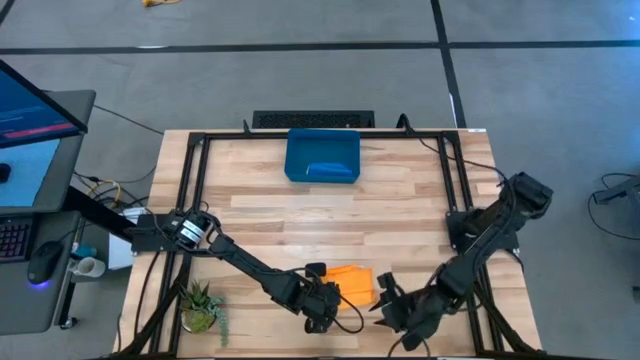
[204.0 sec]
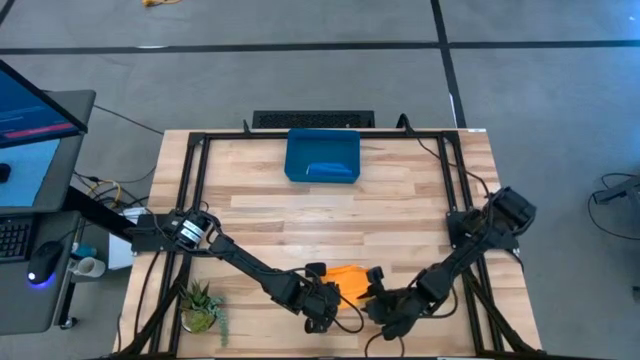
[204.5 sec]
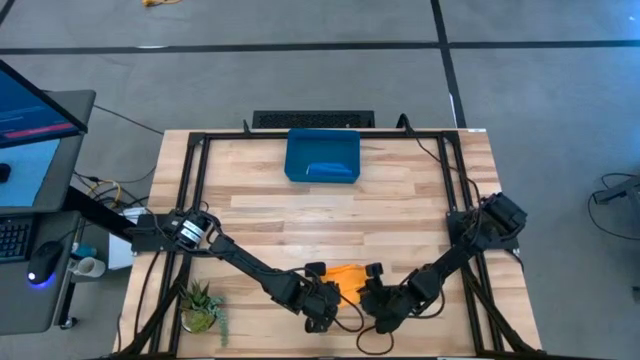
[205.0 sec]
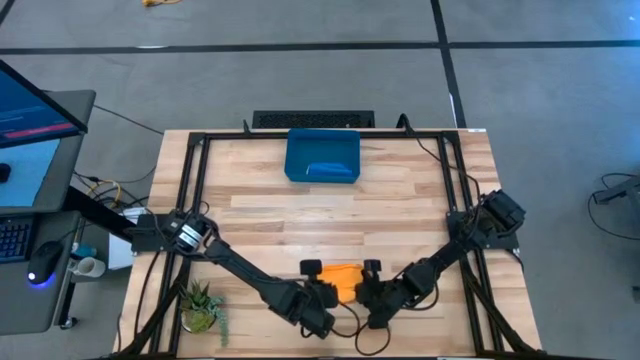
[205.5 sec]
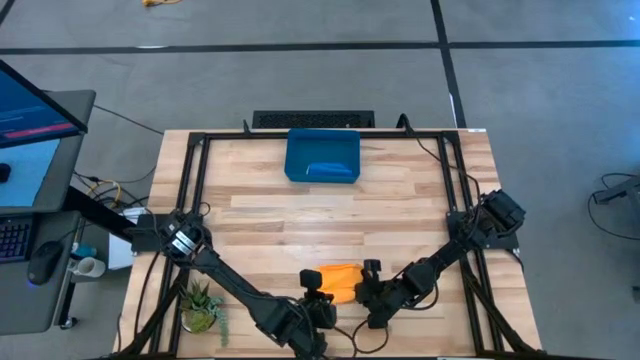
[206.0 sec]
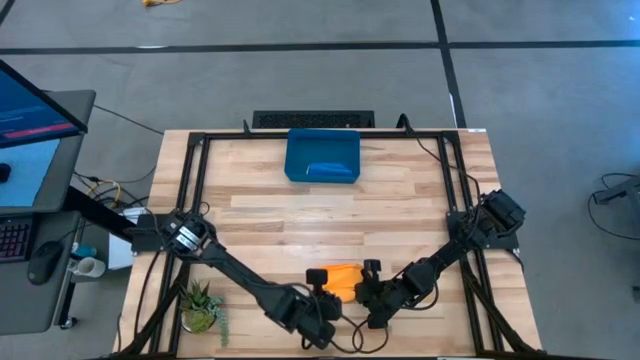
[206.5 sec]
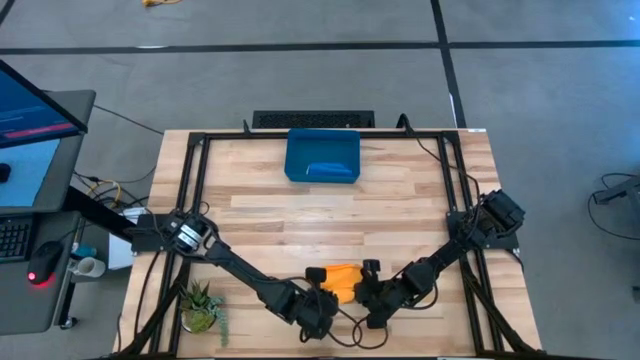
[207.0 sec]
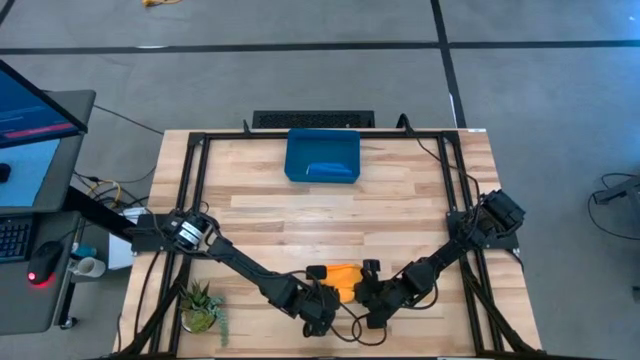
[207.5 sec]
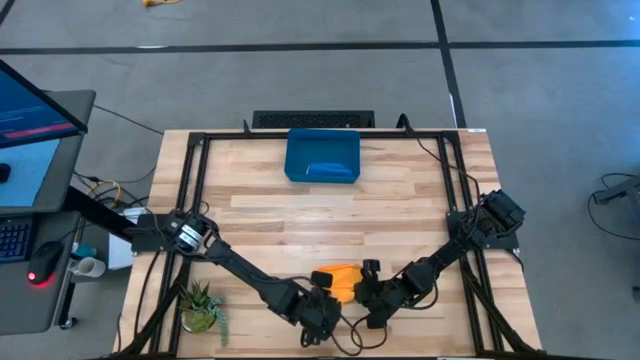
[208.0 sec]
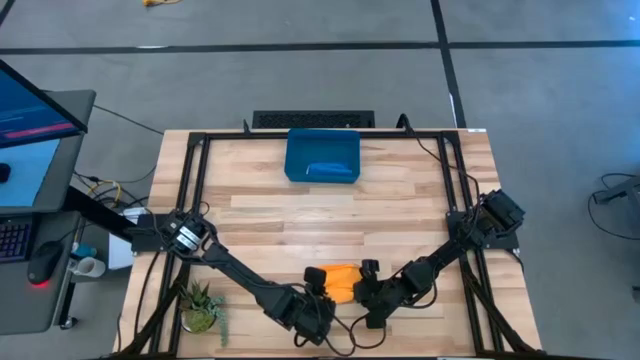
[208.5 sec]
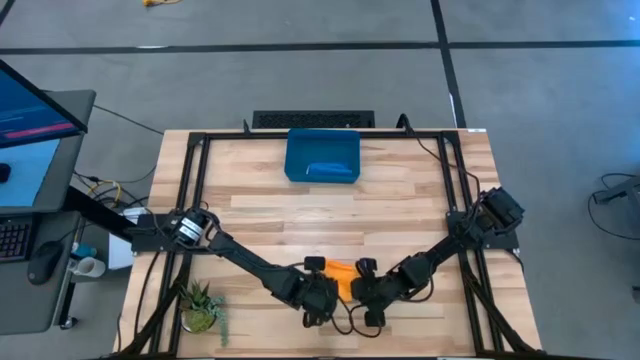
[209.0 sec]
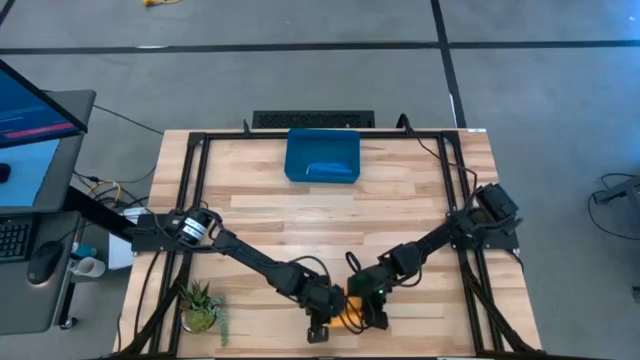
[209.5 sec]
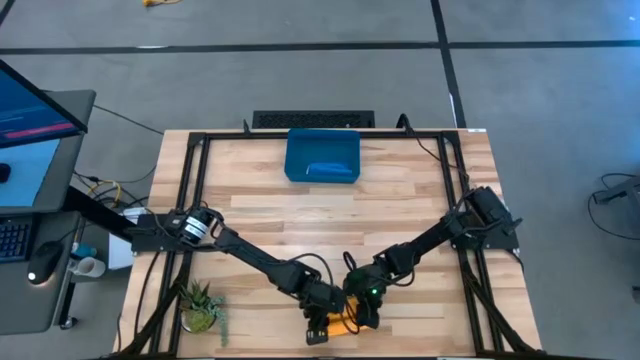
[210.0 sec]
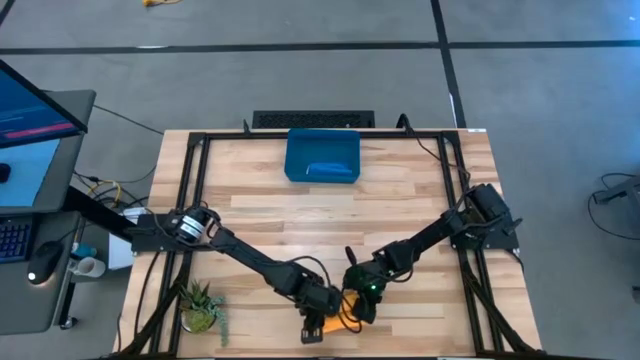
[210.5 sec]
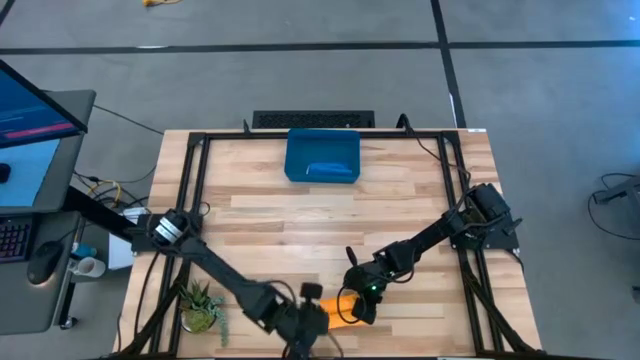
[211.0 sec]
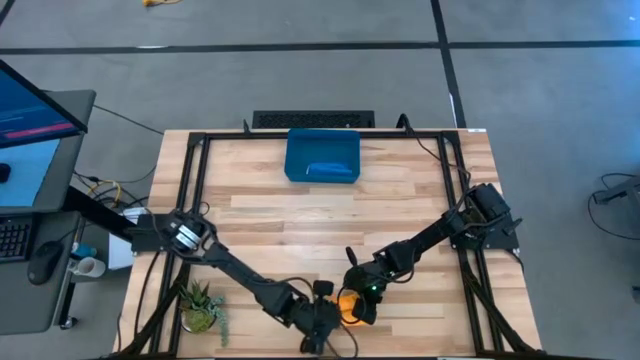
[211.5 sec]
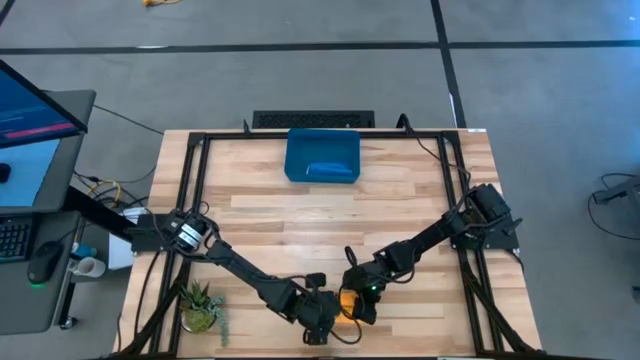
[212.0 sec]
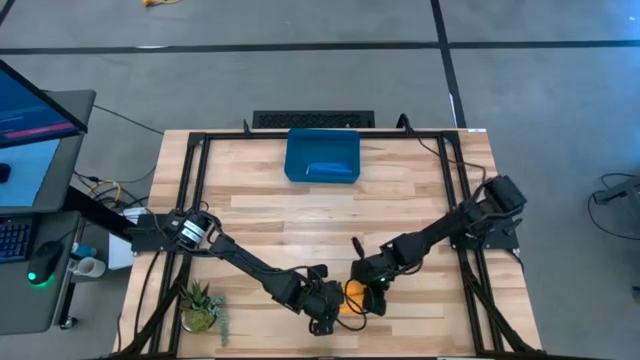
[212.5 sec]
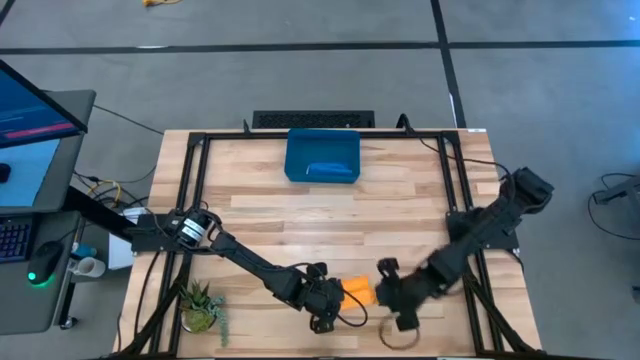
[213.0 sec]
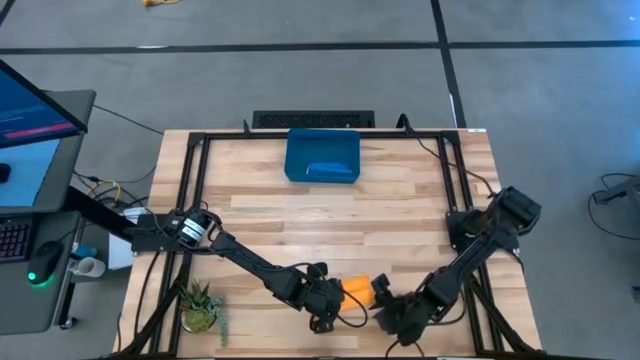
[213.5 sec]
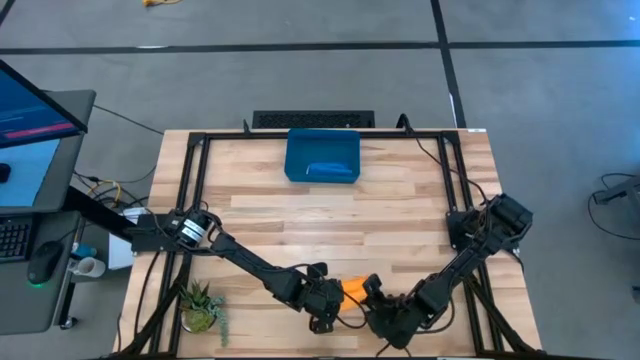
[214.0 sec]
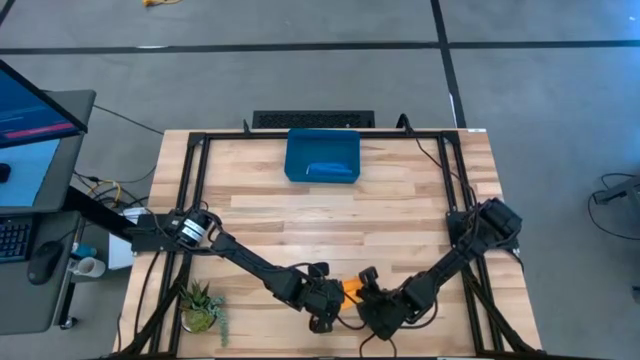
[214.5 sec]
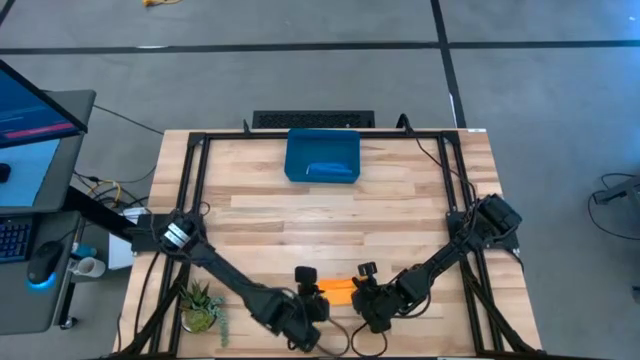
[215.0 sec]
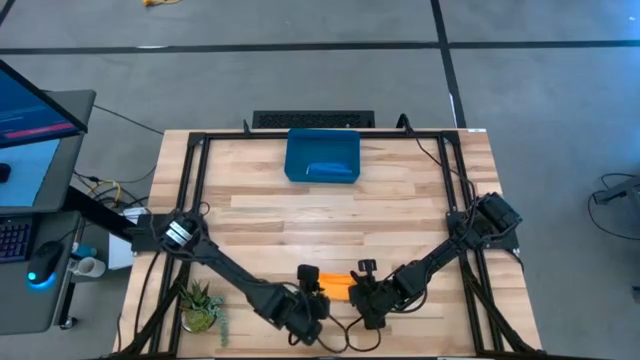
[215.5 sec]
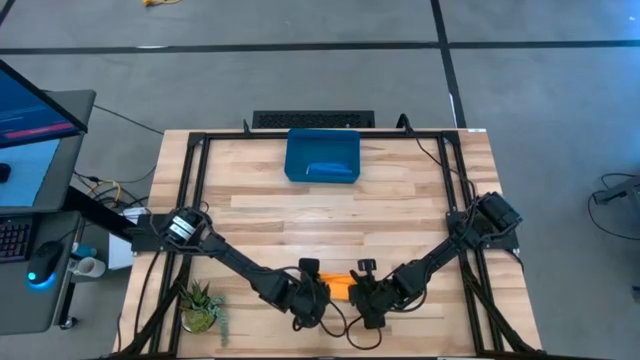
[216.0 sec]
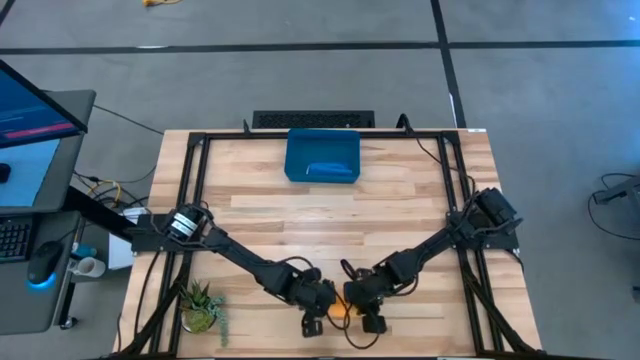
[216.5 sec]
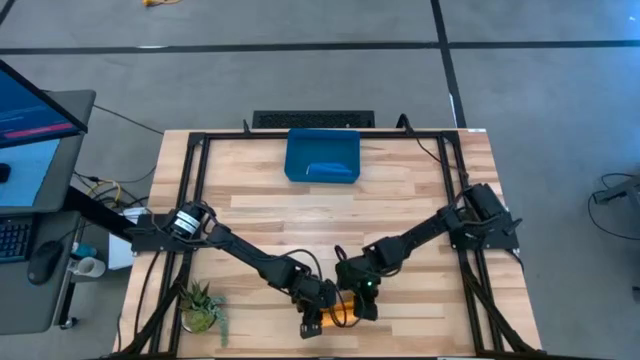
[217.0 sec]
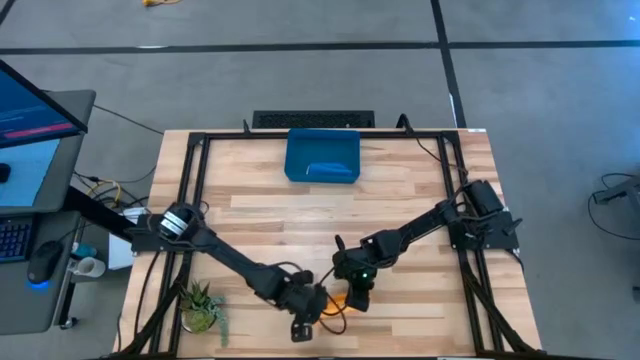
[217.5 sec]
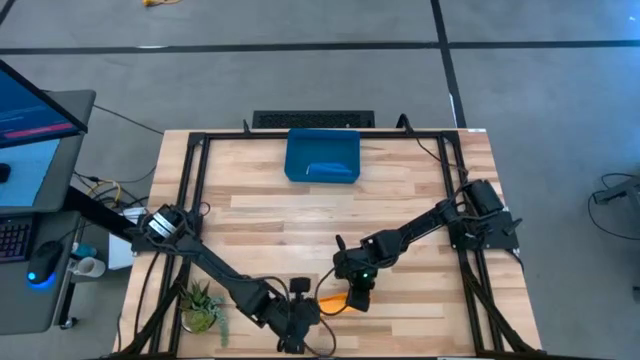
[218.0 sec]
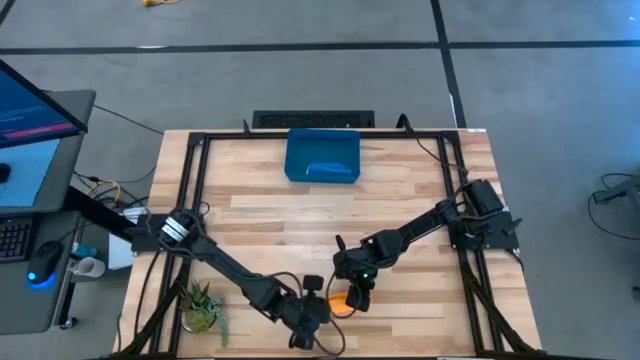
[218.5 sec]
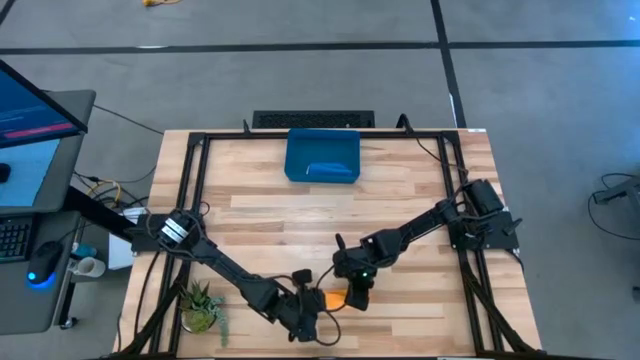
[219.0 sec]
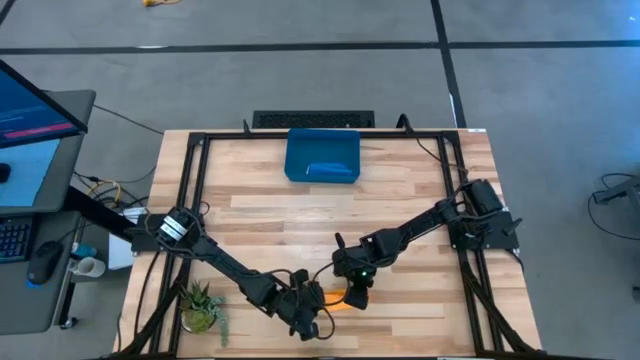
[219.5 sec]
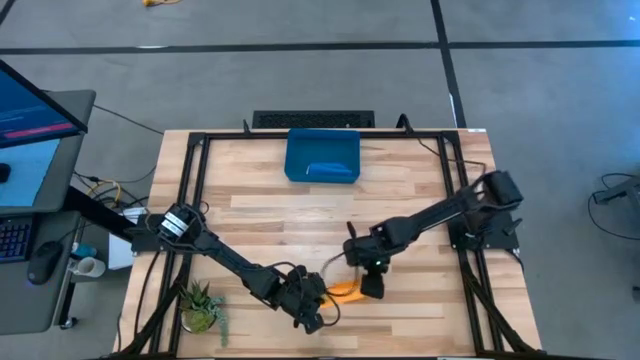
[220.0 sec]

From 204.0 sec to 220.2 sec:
Task: Roll microfiber towels into tight, uniform cylinder then place into a basket
Roll the orange microfiber towel

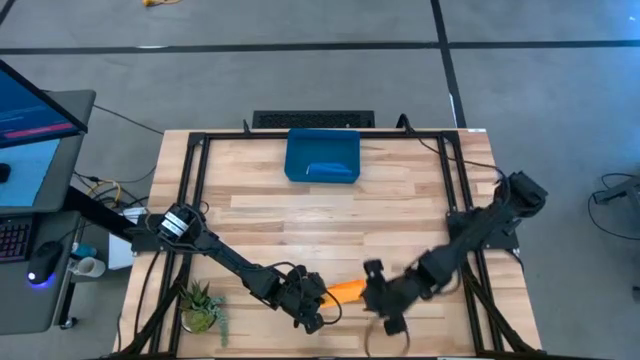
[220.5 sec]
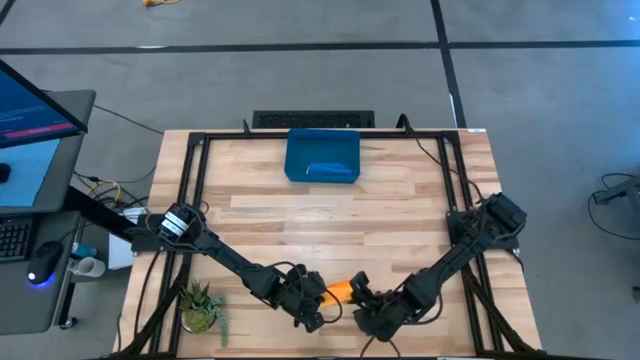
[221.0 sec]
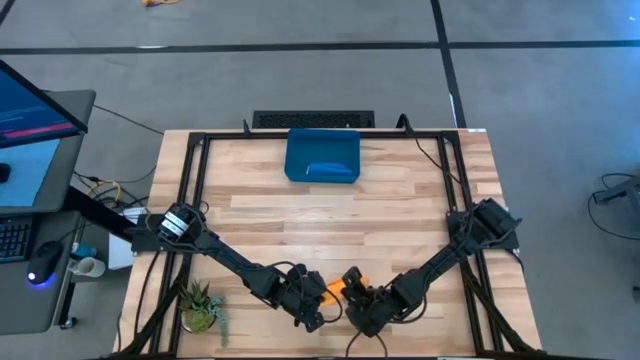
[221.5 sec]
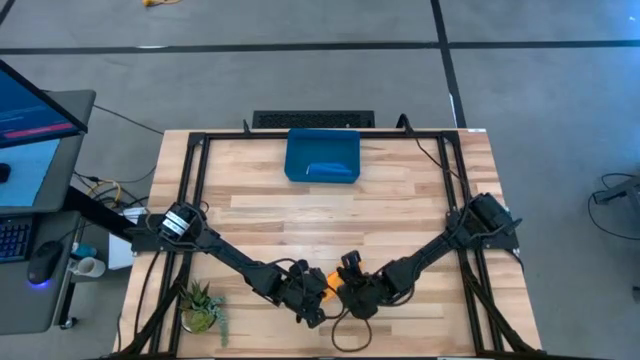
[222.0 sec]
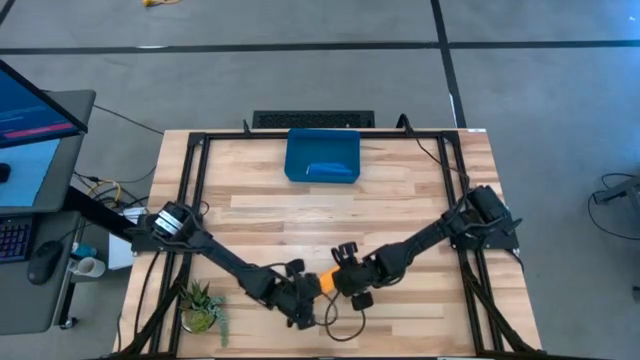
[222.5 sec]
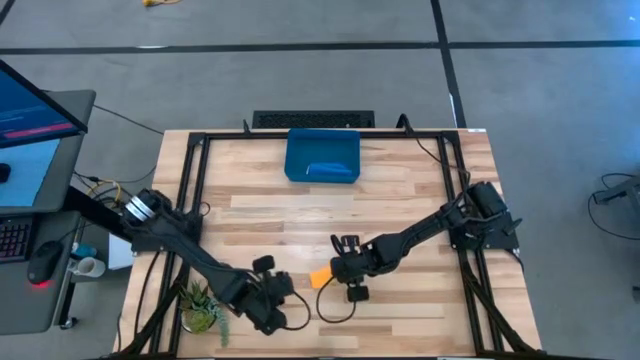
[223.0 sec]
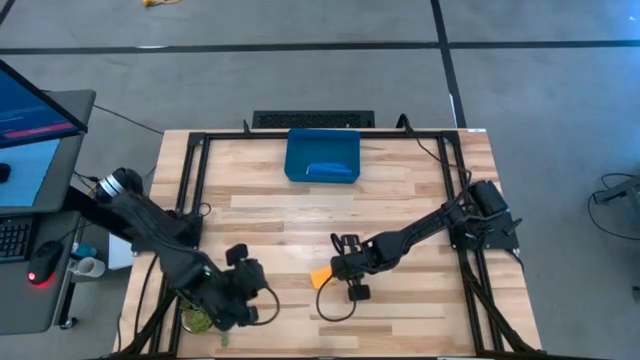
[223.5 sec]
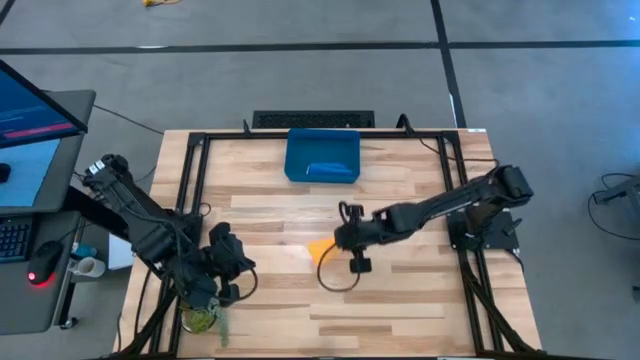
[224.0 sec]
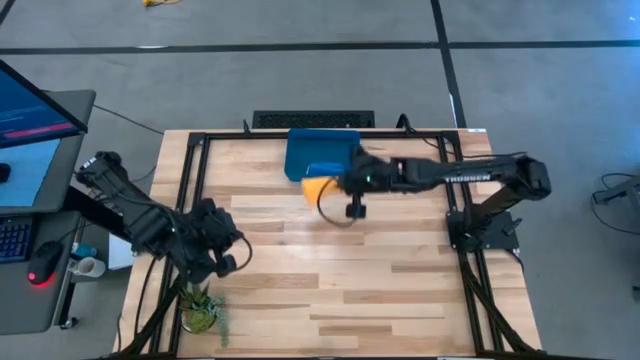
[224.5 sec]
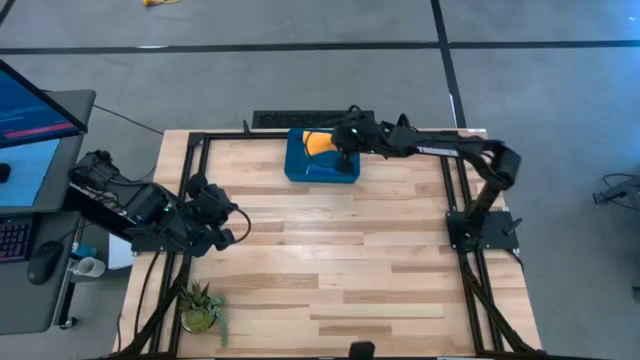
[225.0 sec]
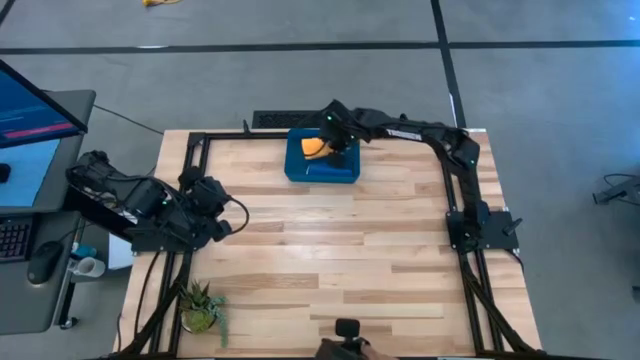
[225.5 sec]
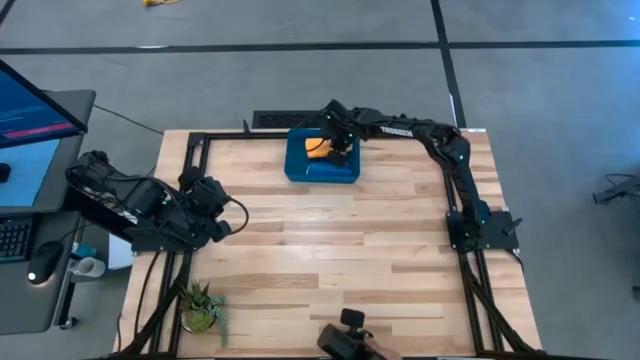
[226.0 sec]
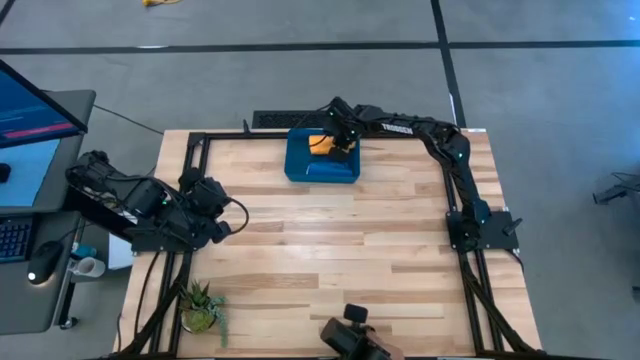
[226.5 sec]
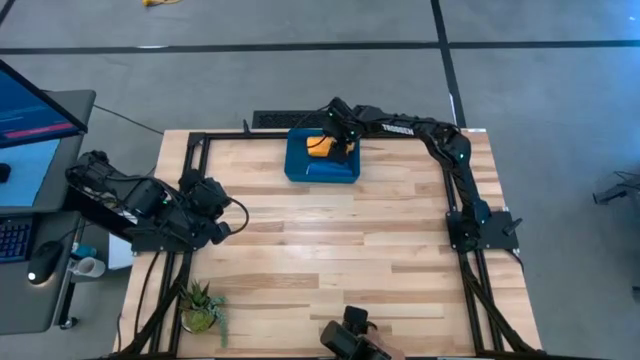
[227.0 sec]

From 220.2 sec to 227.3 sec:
Put the orange microfiber towel into the bin
